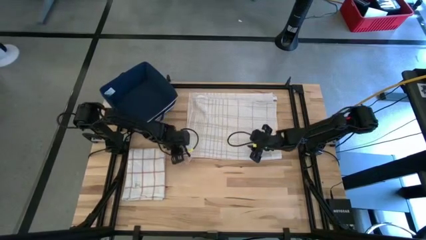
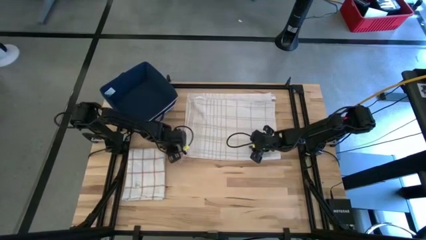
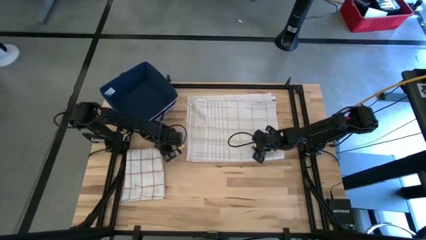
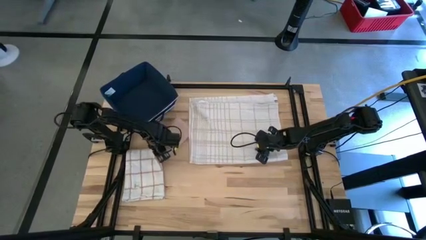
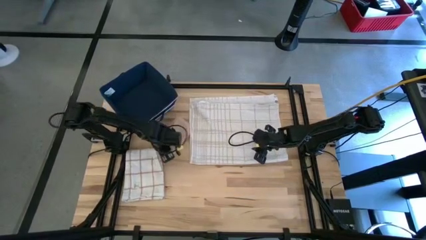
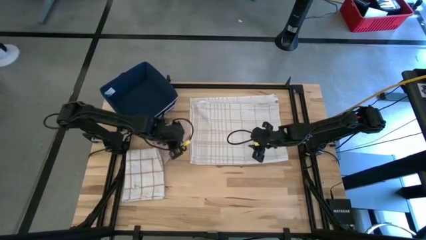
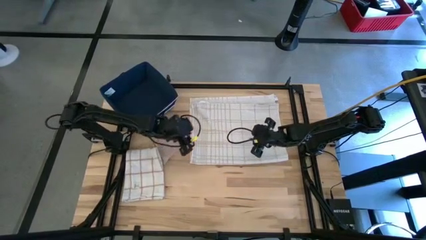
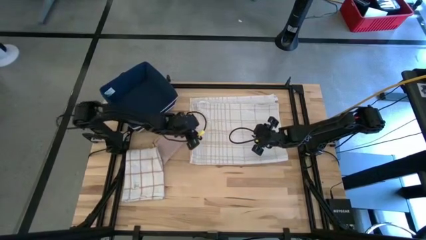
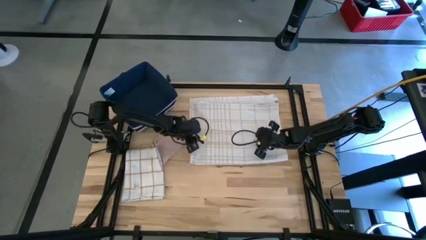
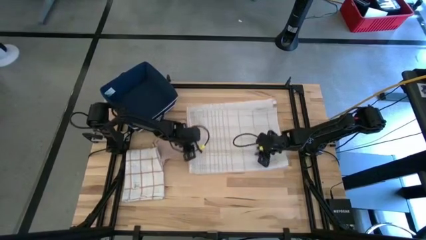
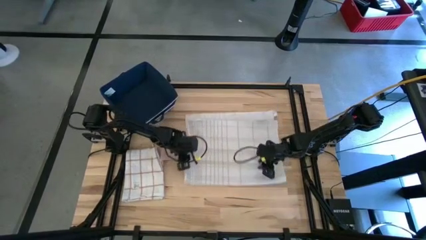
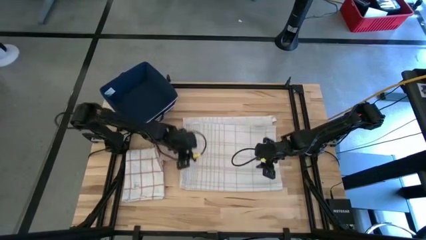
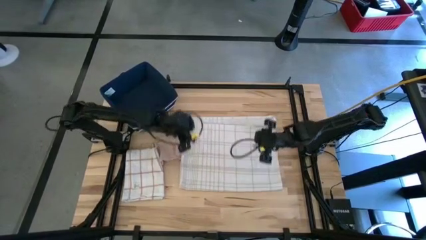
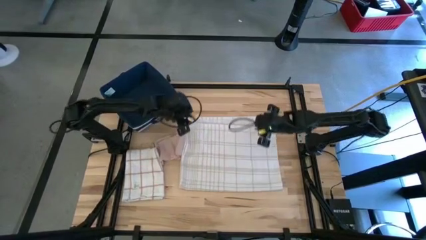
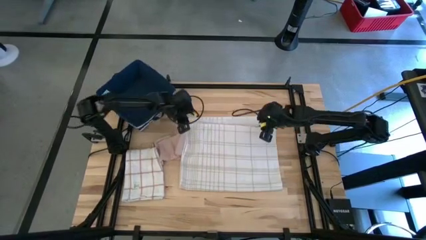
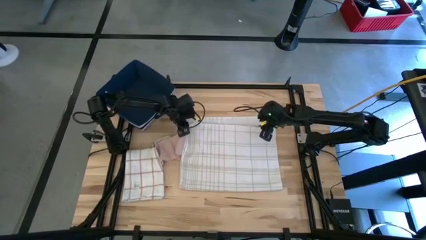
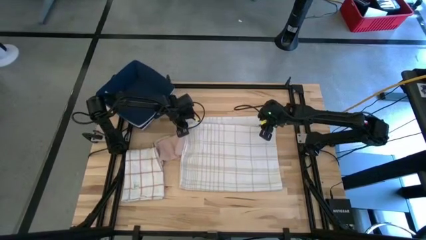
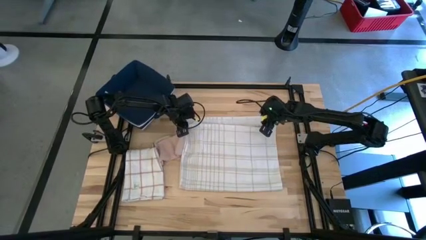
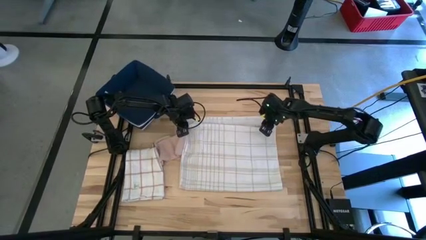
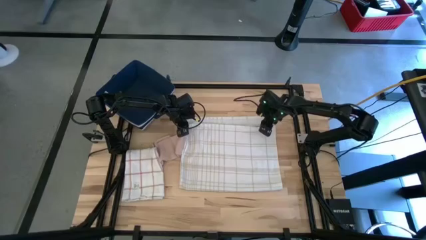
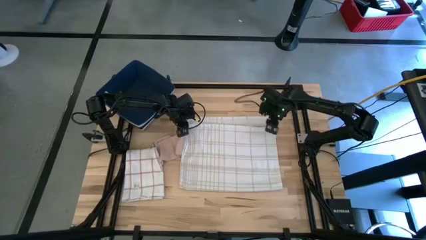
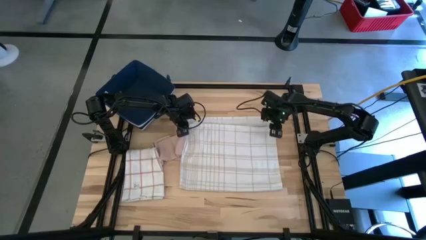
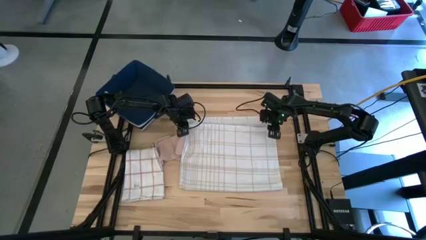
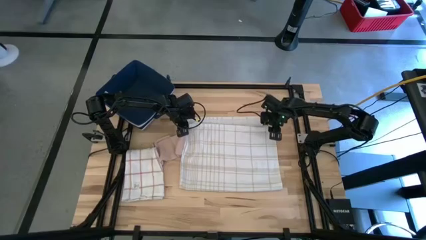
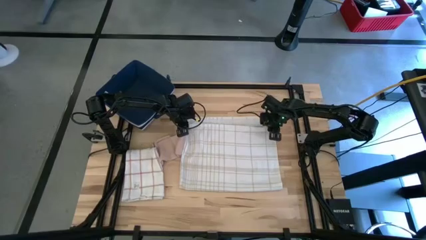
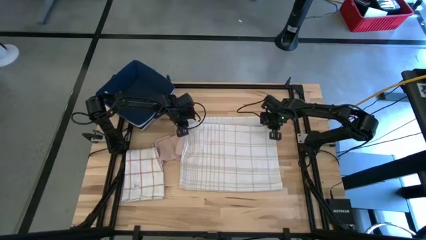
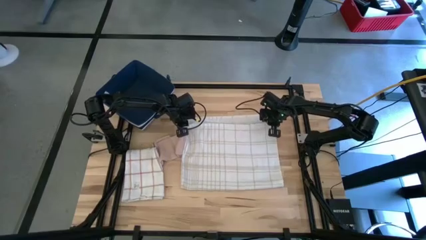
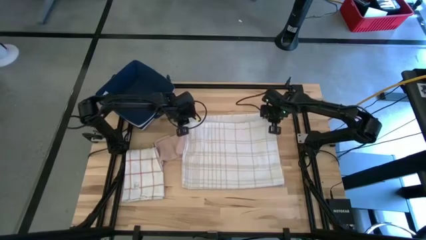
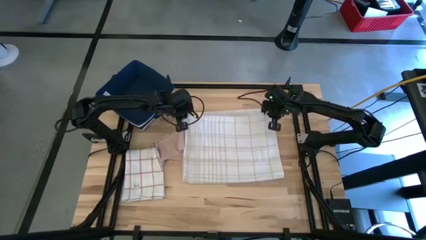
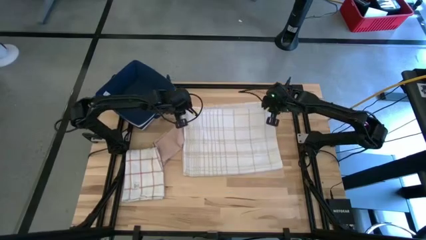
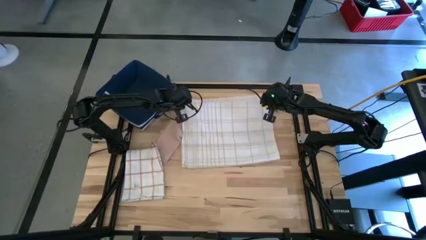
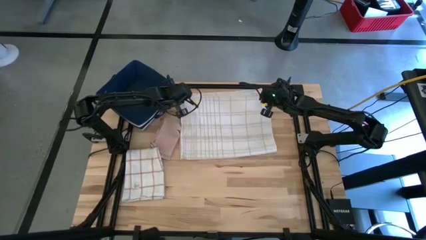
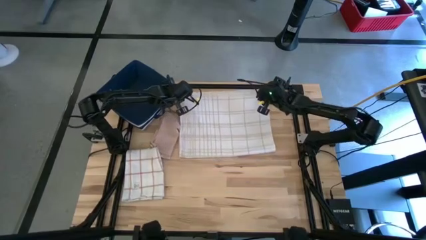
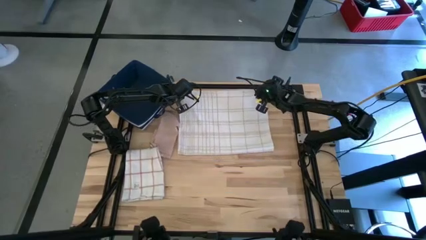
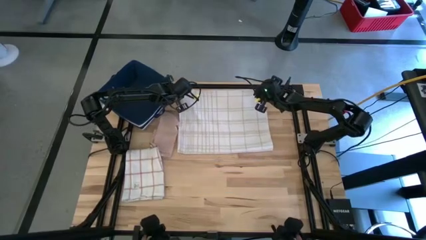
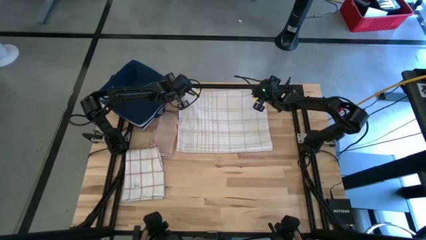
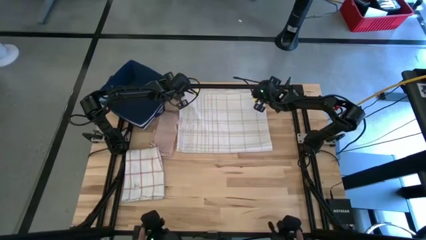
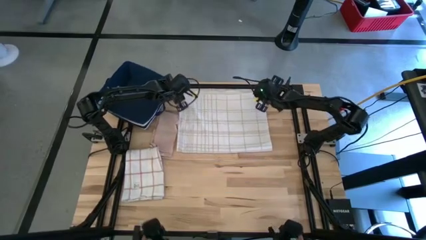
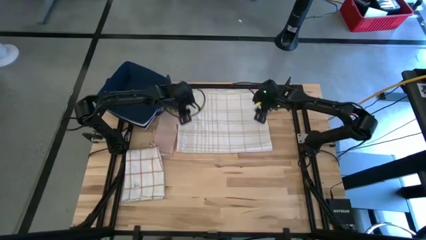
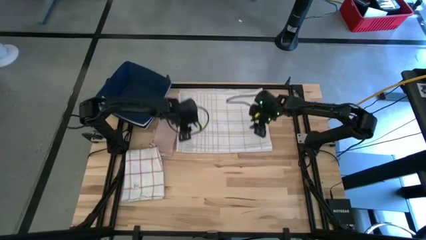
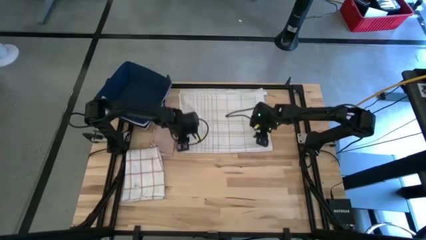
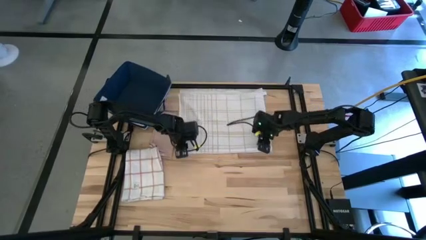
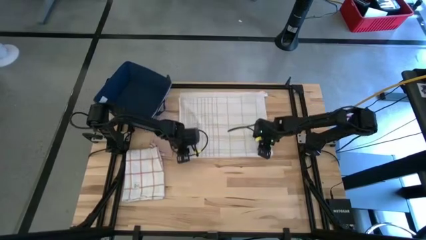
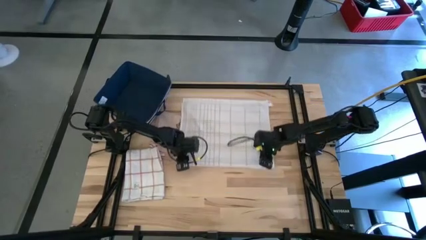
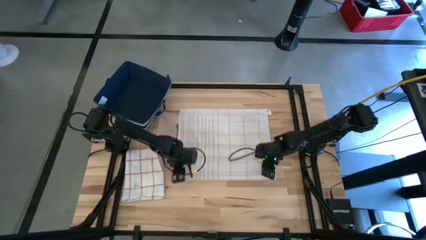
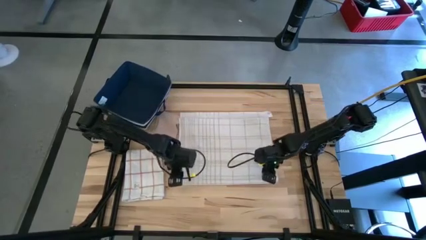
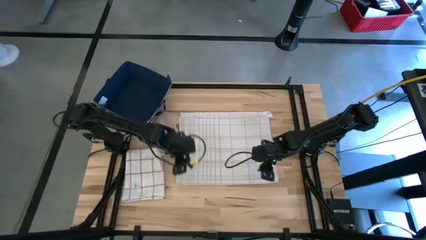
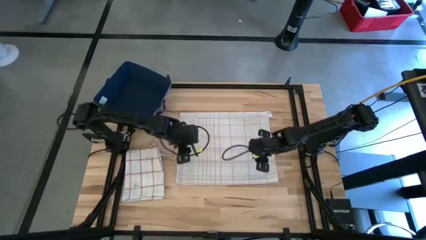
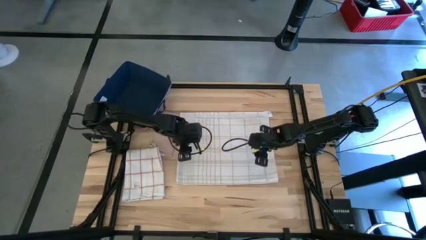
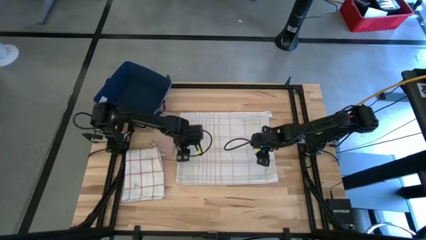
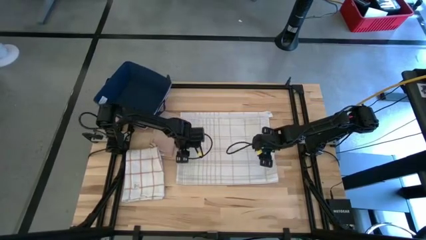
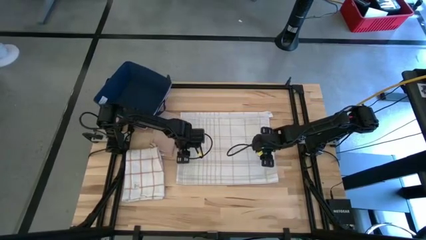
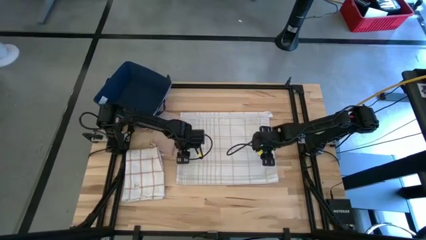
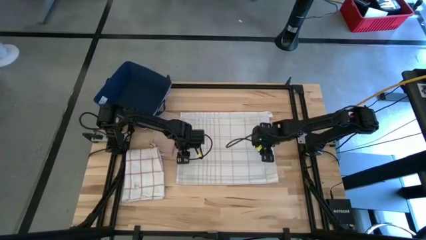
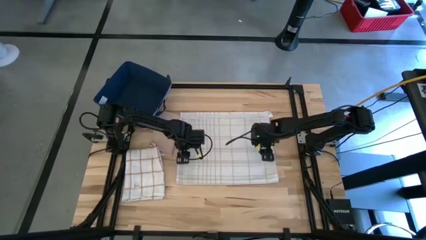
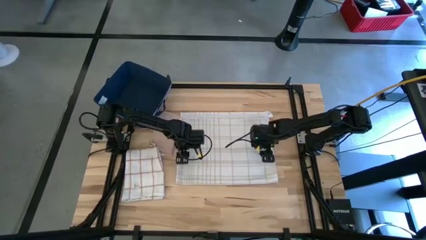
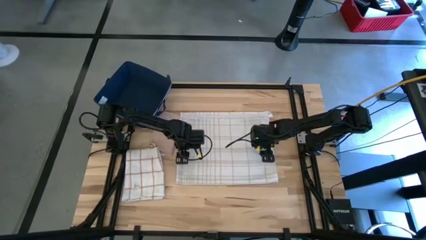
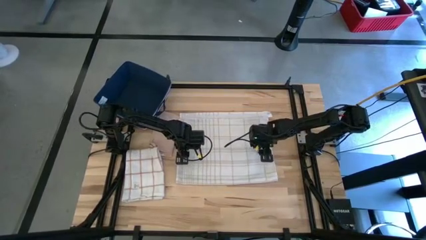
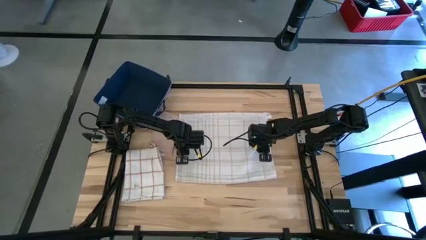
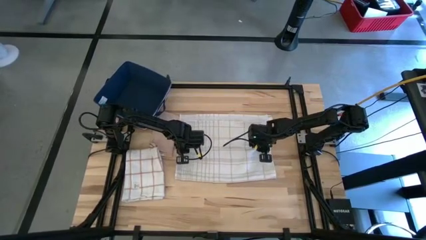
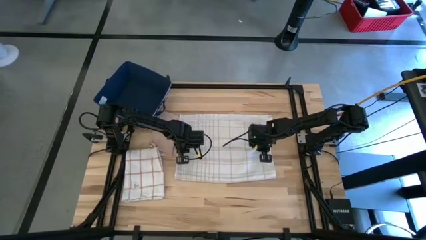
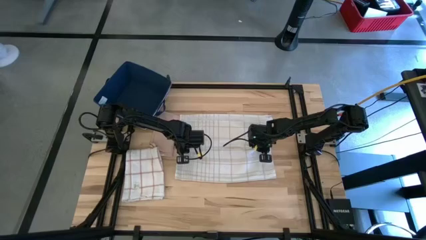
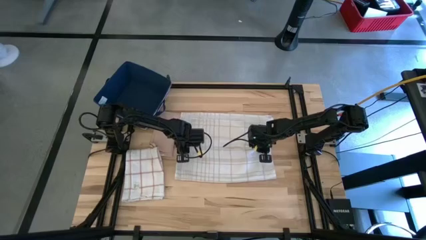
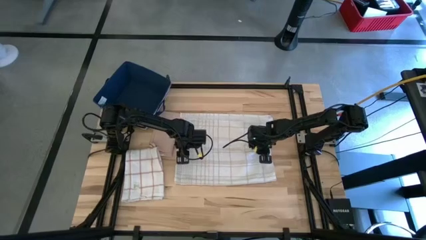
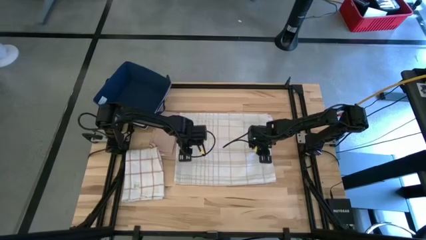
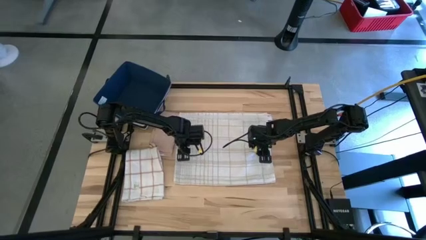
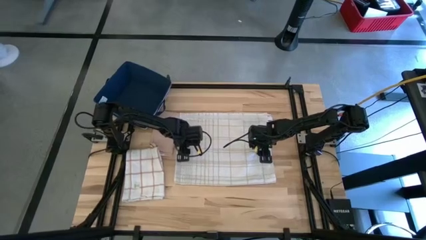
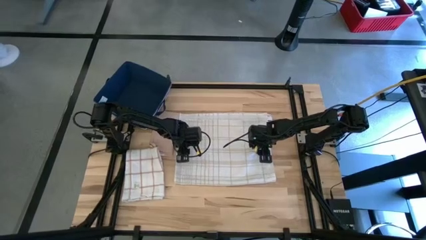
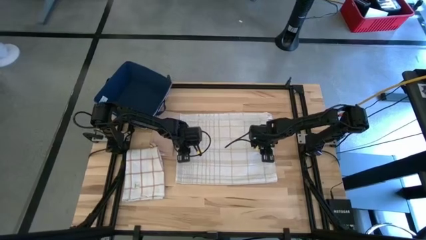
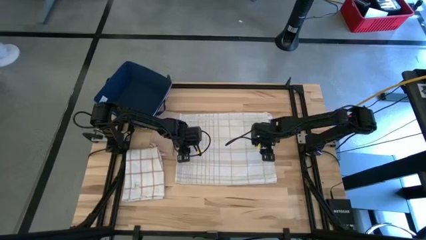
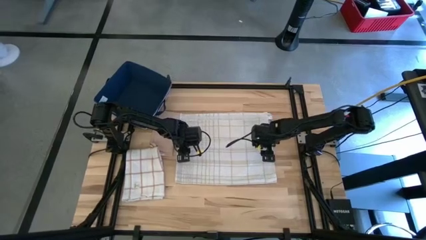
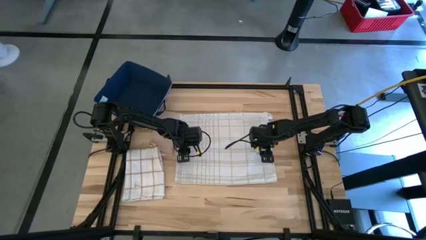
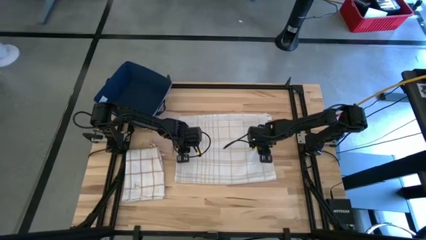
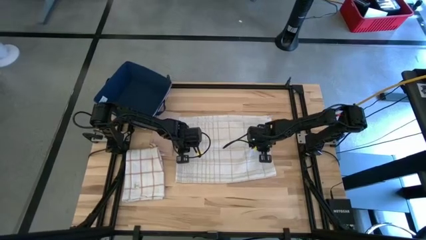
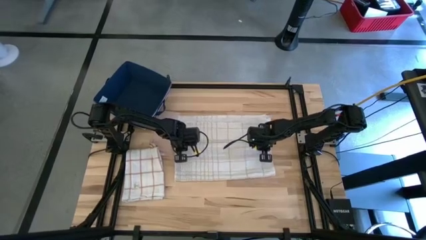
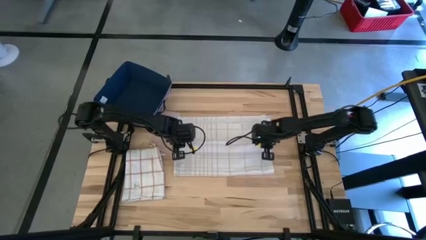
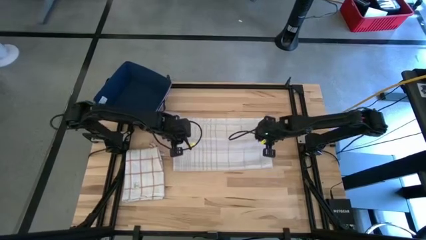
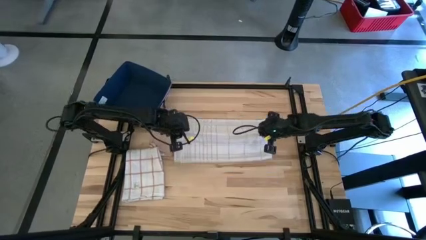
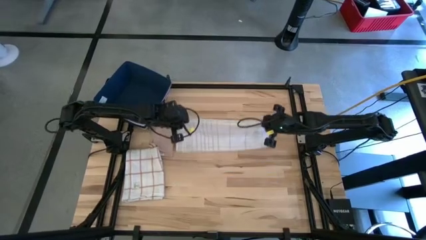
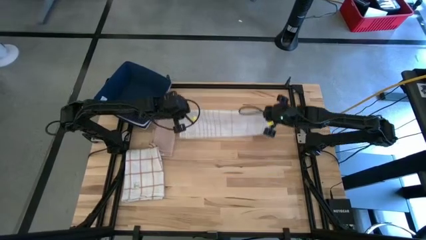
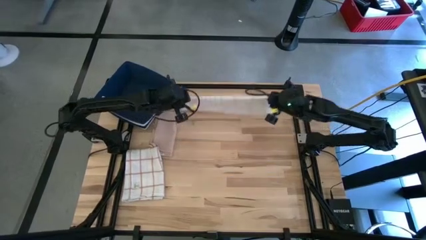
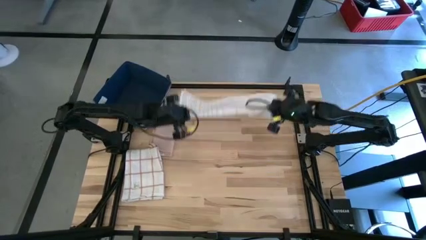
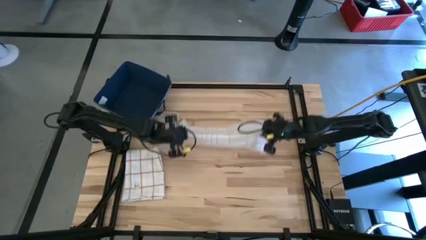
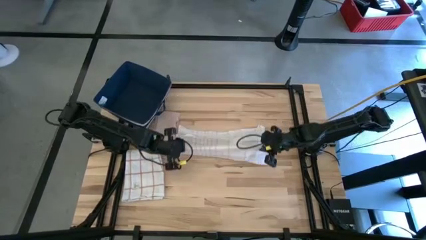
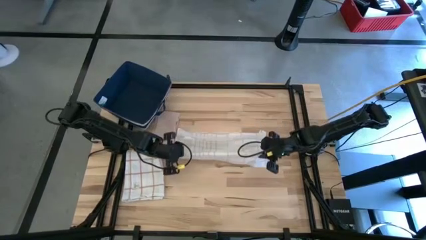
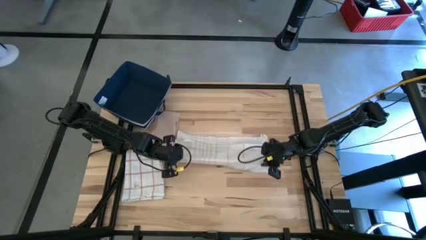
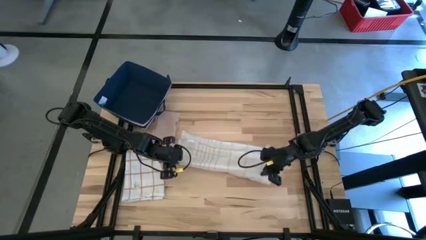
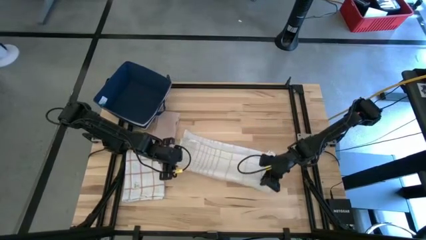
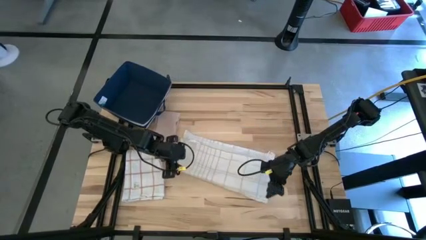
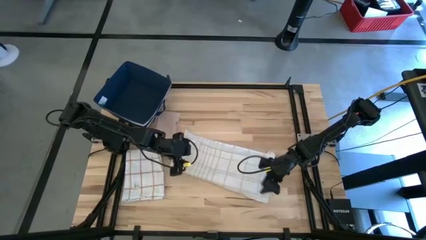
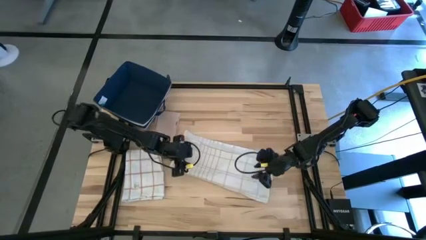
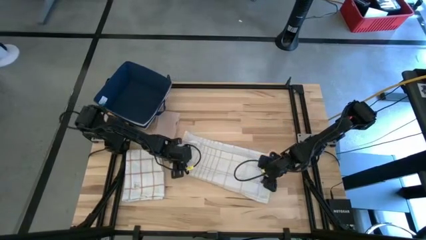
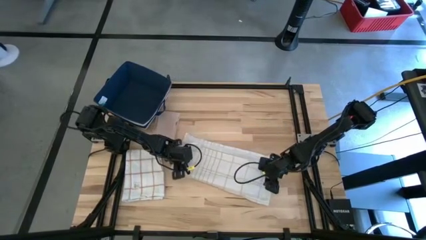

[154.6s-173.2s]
Task: Fold towel
Fold the right white patterned towel
